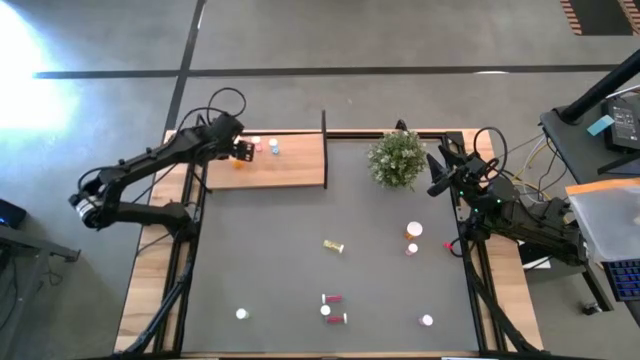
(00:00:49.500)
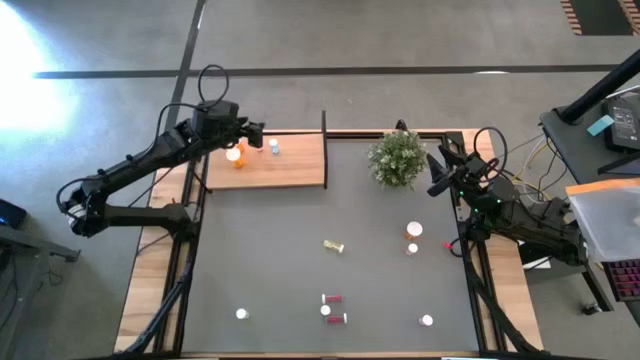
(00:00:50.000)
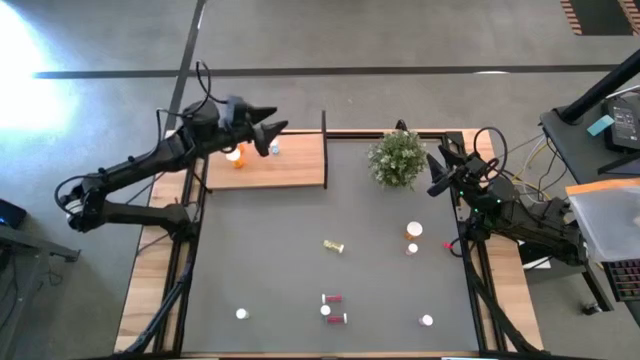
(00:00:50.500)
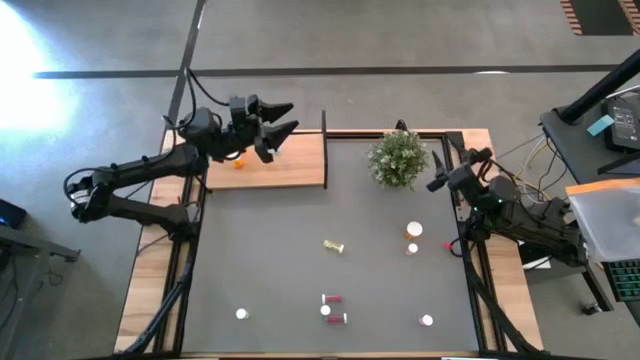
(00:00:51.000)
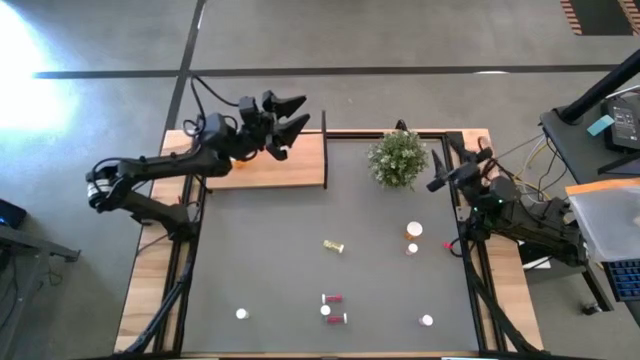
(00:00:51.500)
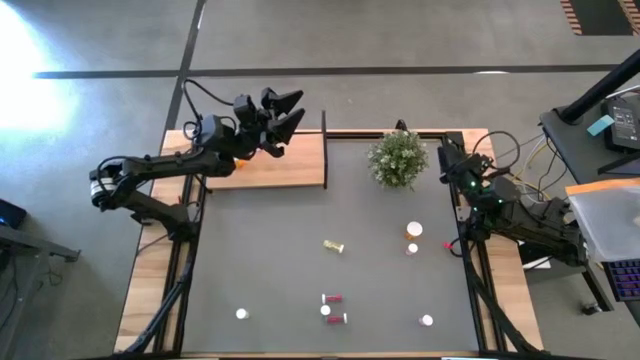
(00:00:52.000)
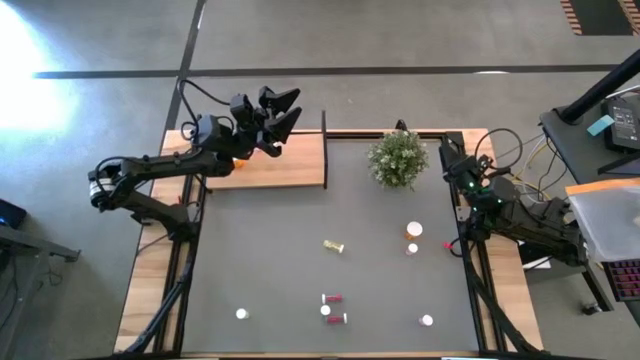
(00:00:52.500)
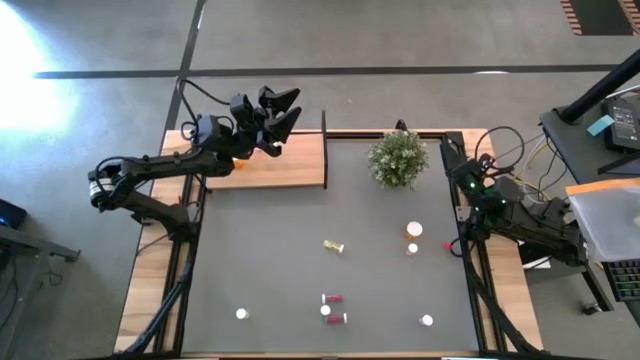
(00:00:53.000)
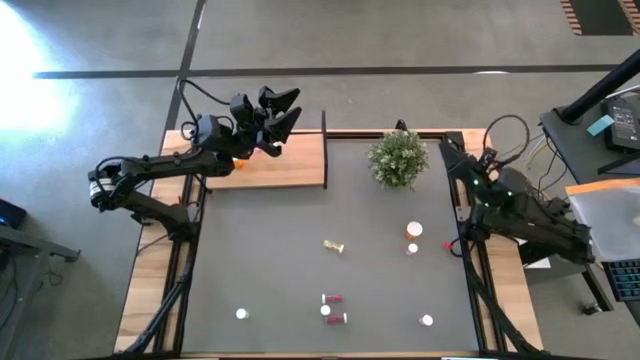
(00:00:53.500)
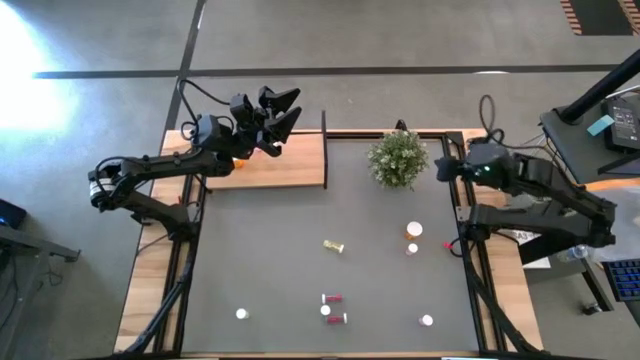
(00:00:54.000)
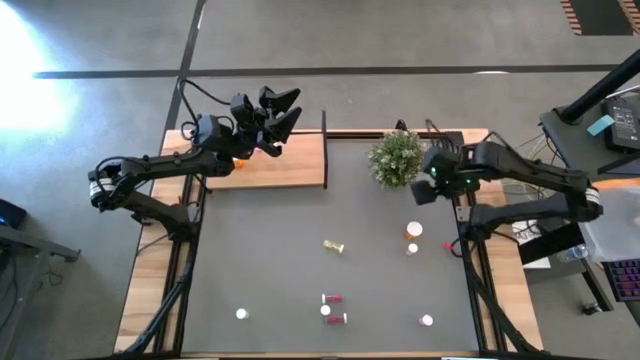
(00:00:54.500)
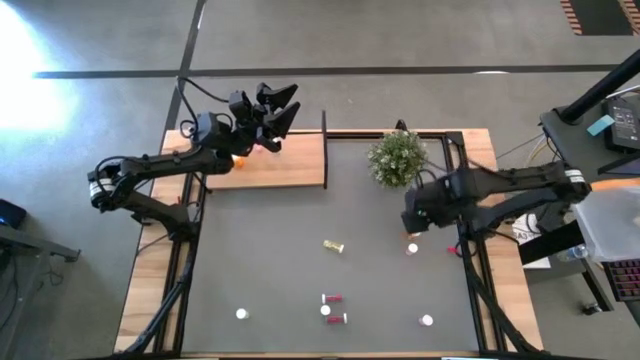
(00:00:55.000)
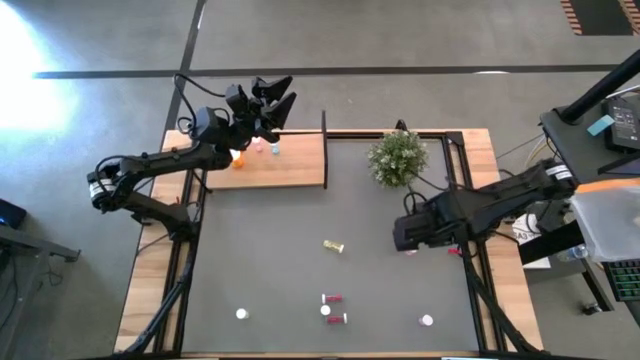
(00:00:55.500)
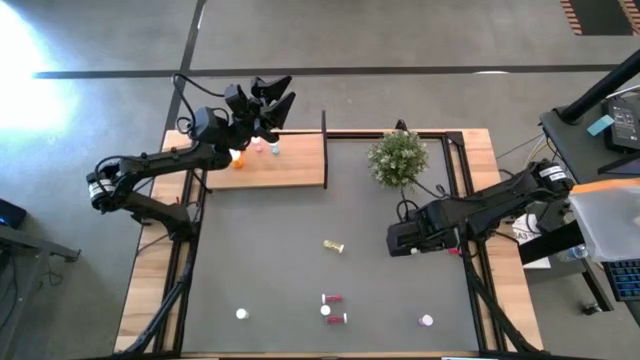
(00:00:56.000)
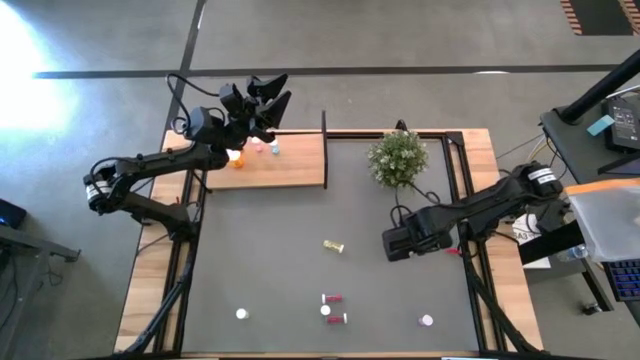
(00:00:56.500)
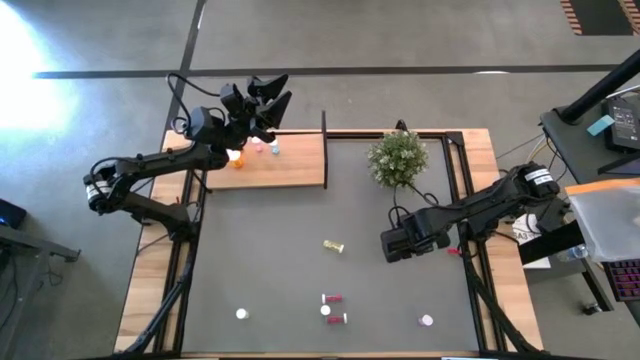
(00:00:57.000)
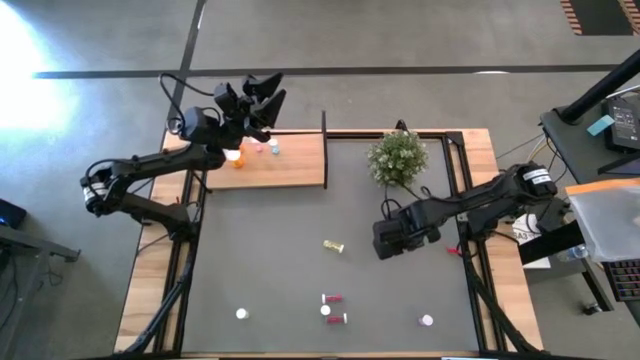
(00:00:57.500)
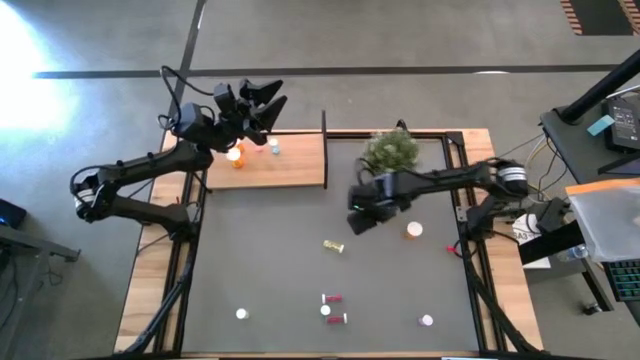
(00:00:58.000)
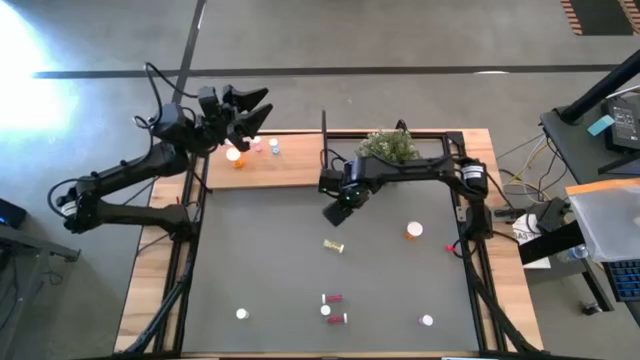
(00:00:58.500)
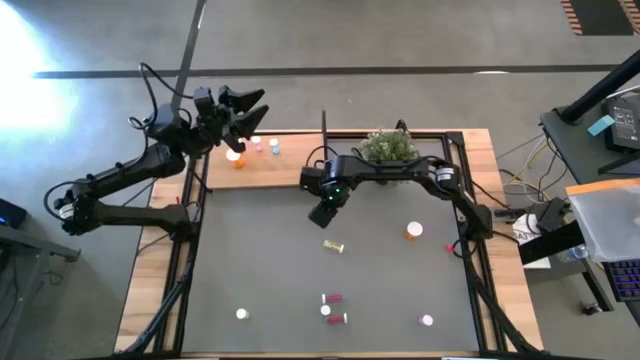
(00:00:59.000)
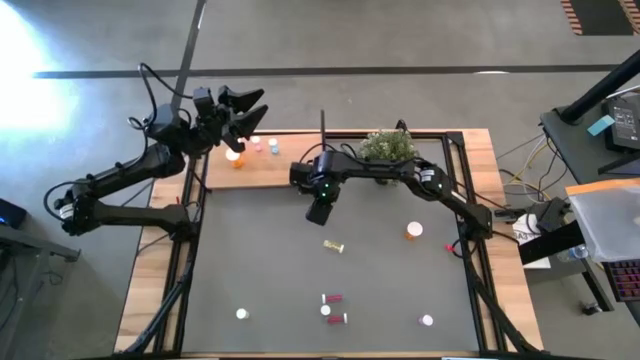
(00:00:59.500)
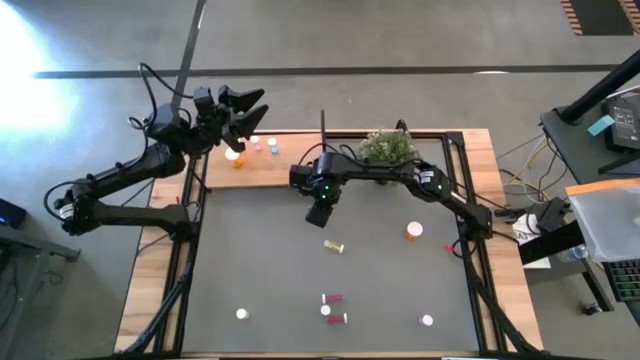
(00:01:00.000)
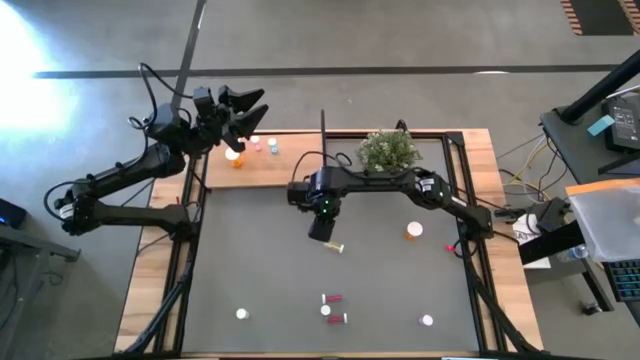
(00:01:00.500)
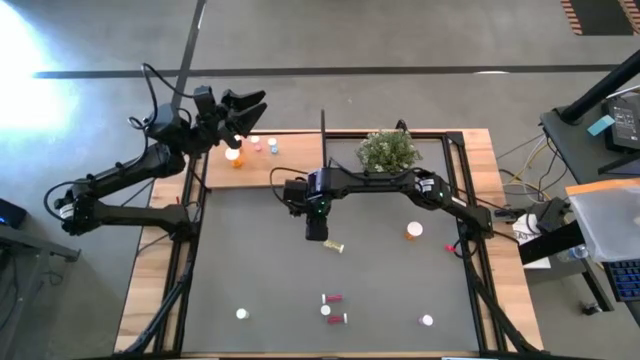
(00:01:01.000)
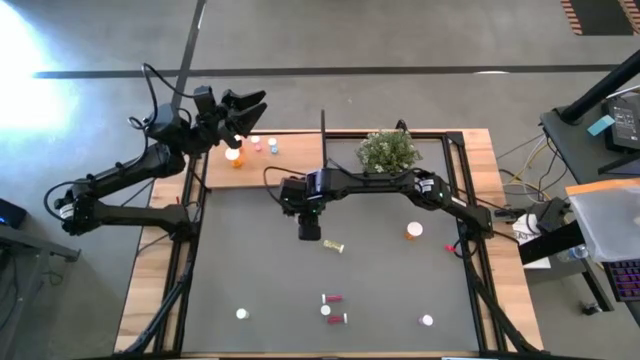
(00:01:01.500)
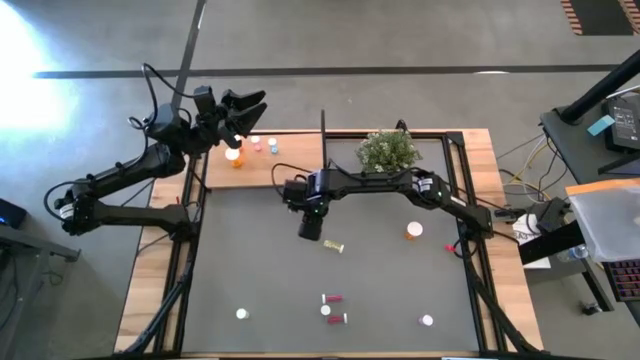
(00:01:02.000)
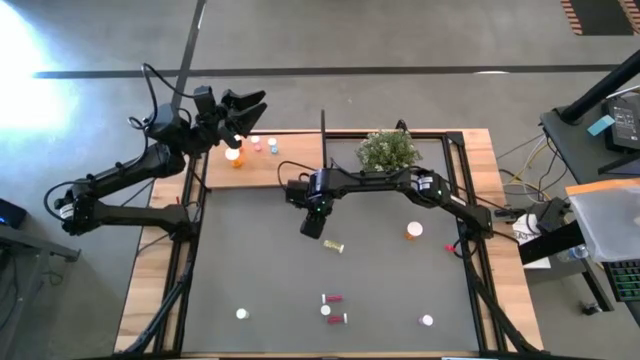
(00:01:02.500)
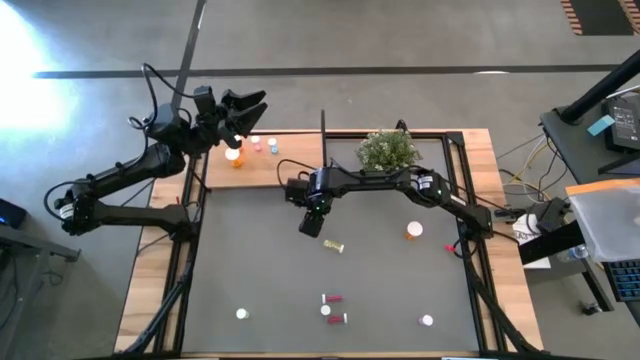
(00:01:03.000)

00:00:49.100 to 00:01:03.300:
Task: Pick and place medicine bottles onto shelf by color
Move the top small pink pill bottle to the center of the table

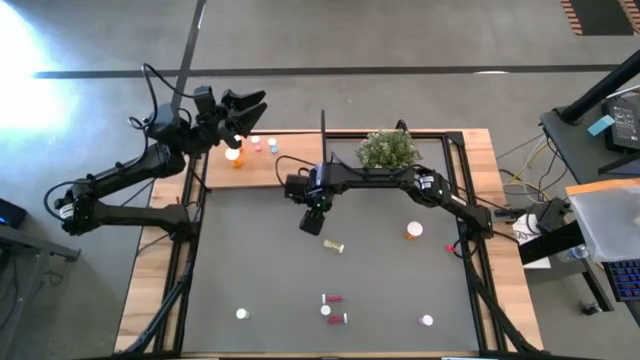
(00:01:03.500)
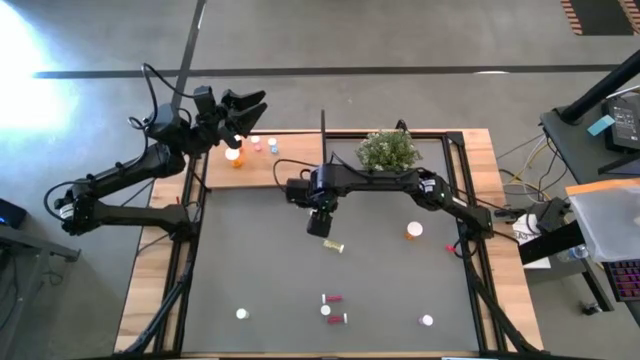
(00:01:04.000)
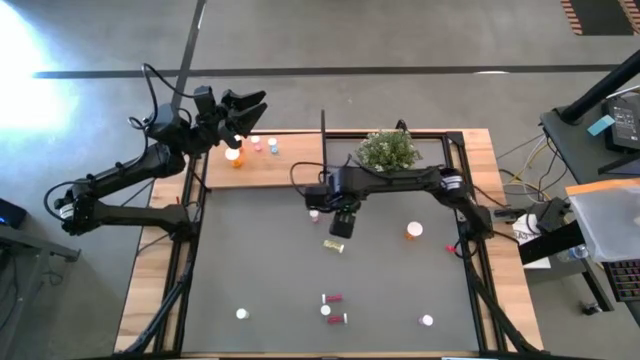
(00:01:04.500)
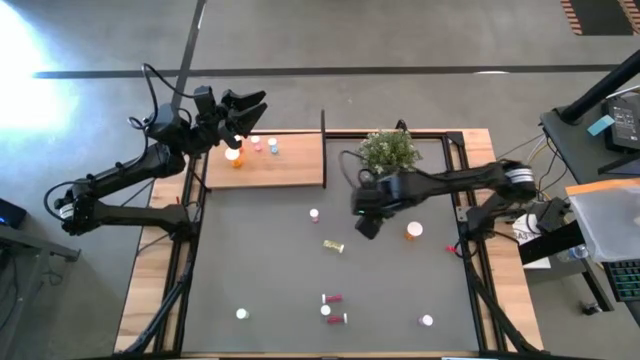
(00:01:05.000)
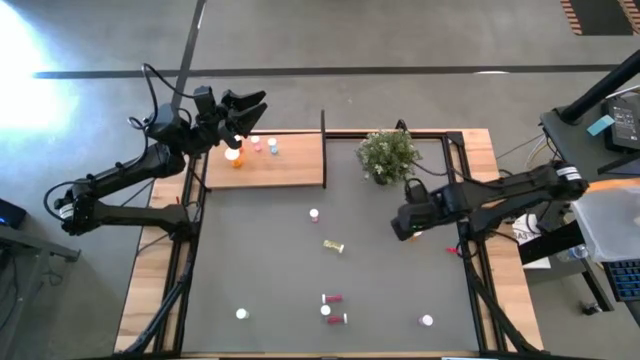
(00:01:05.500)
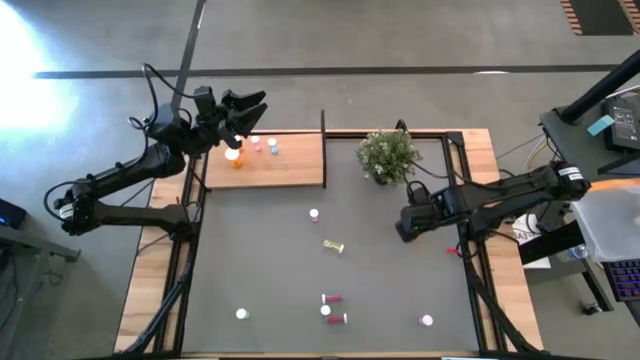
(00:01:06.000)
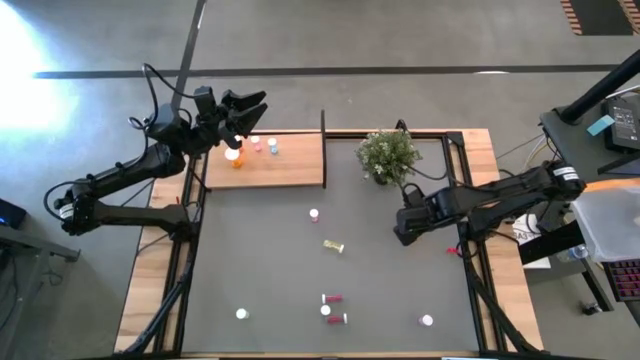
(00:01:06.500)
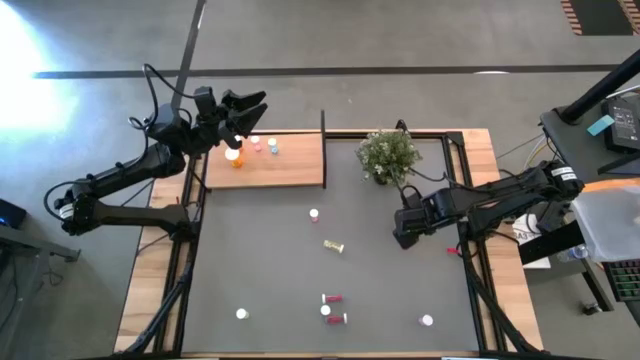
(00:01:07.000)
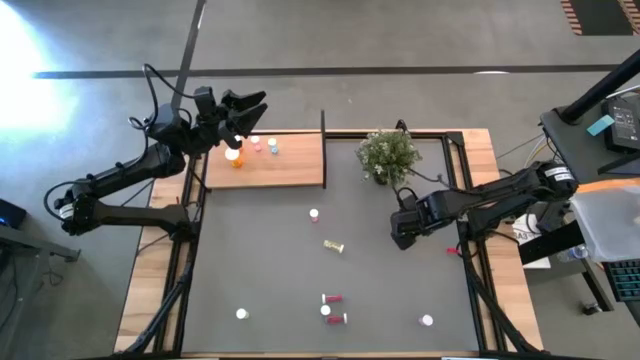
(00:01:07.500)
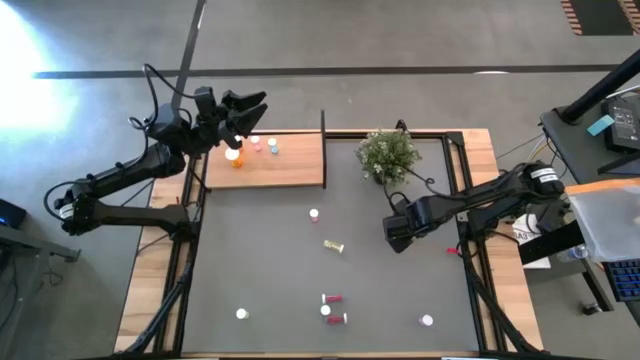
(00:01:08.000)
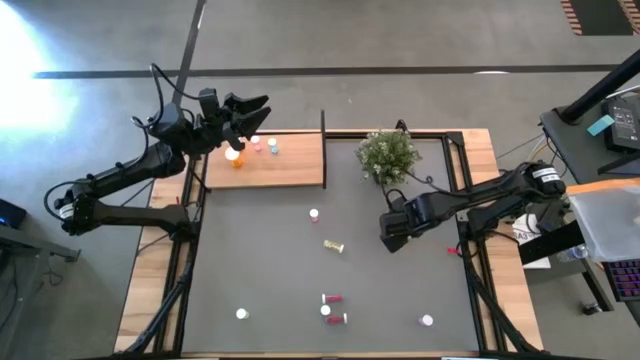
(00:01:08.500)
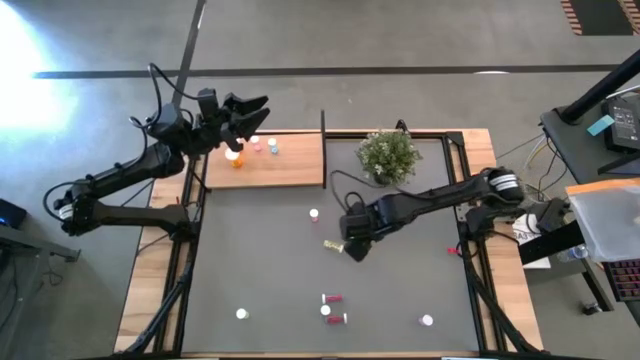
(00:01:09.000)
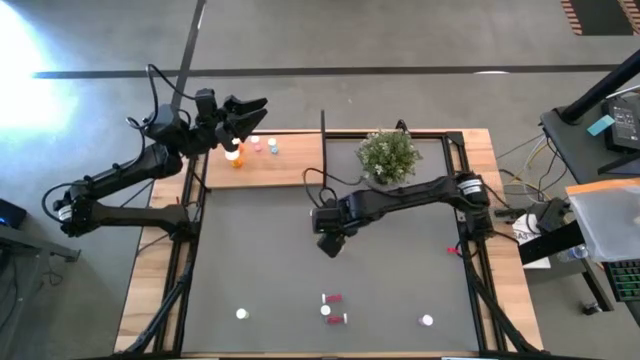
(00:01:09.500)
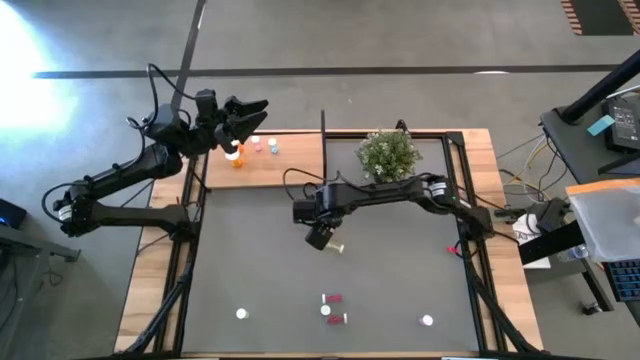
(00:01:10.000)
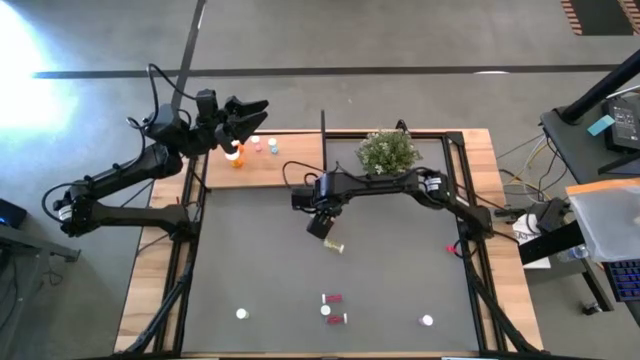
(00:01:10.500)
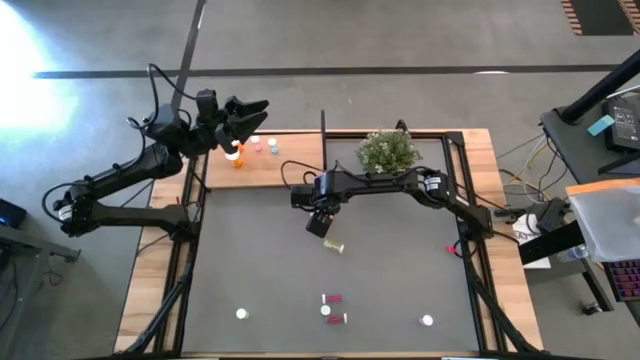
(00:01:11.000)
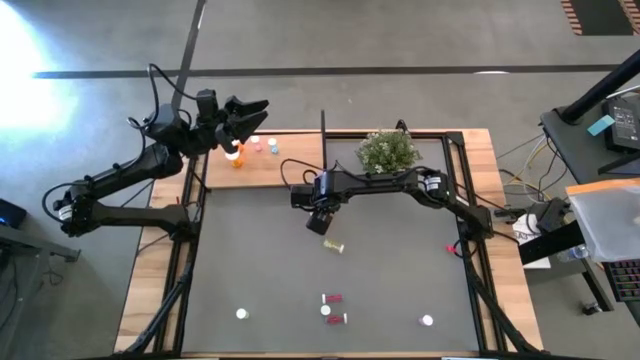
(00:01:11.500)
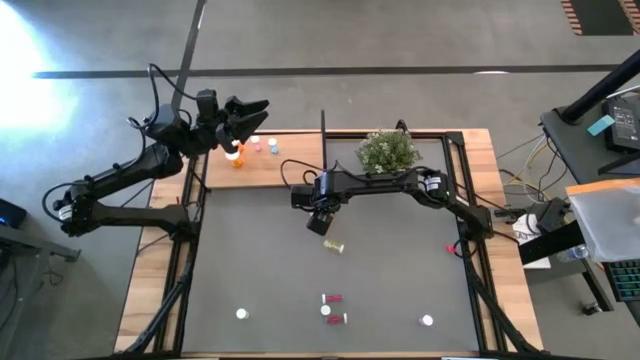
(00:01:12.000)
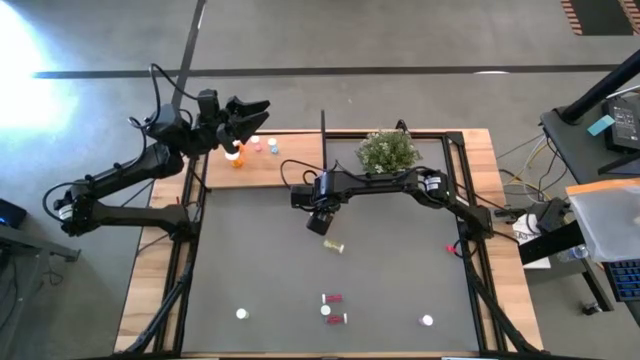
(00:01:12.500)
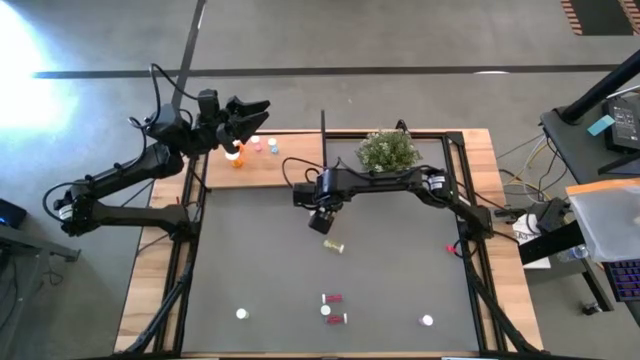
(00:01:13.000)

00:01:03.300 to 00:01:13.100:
Move the large orange pill bottle to the center of the table
